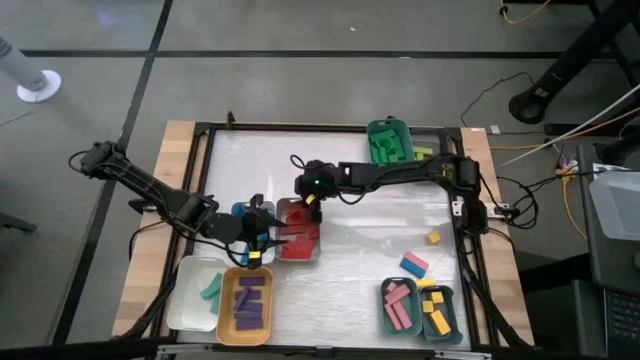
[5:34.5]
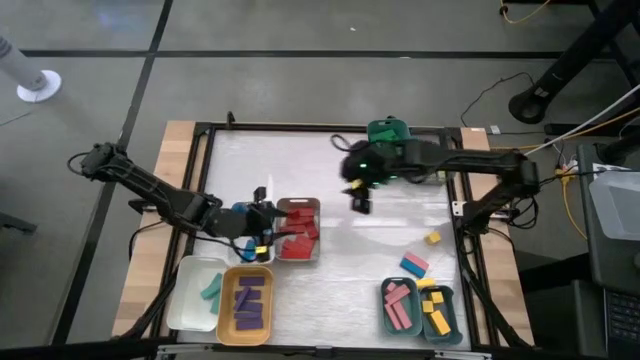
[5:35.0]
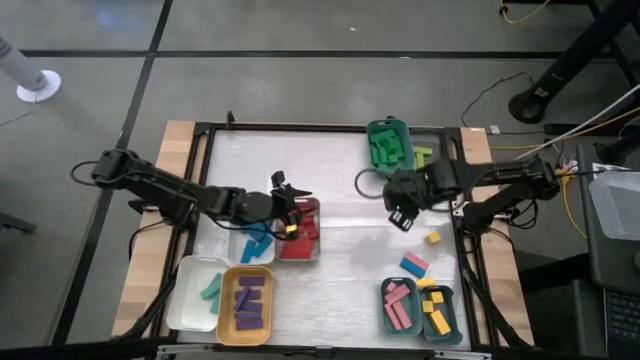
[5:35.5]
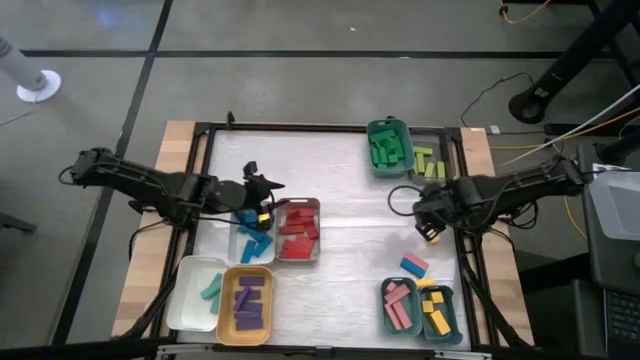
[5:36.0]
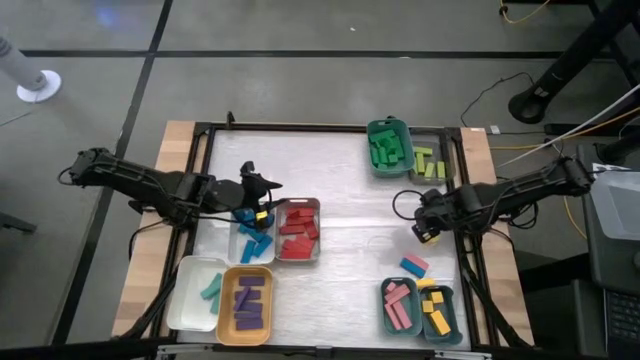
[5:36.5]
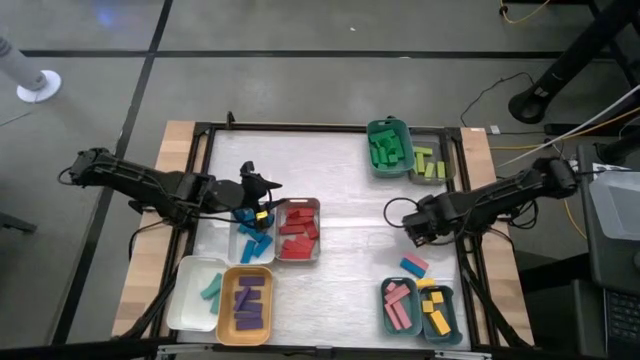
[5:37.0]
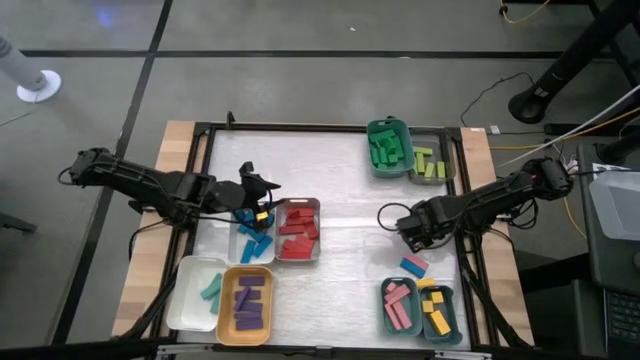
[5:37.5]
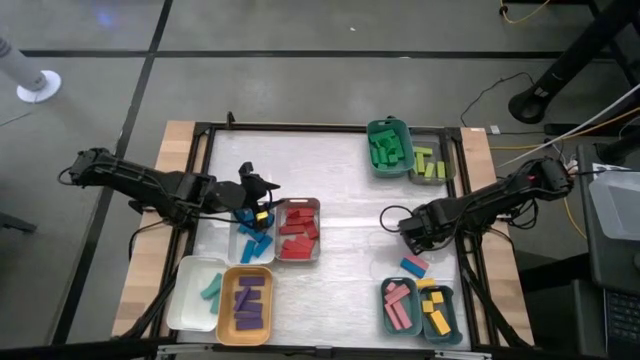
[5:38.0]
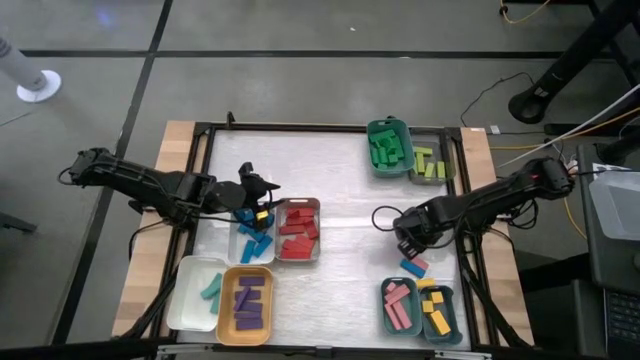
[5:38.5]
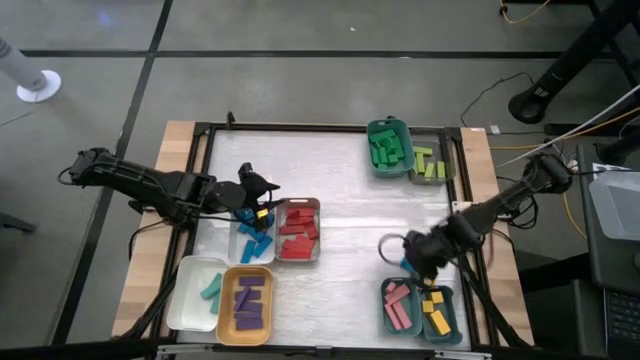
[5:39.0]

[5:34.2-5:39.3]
Task: Sort blocks
Put the yellow block into the dark blue bin

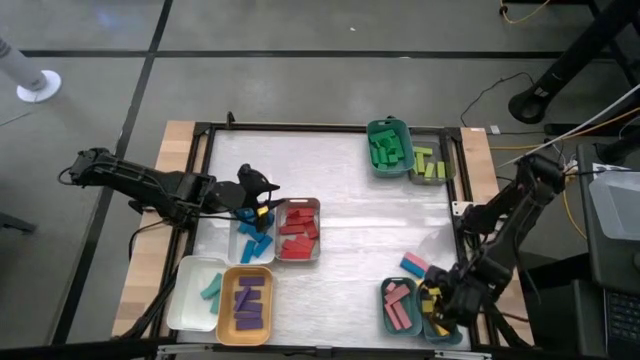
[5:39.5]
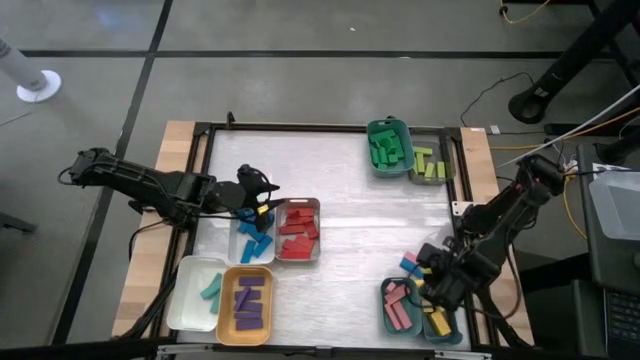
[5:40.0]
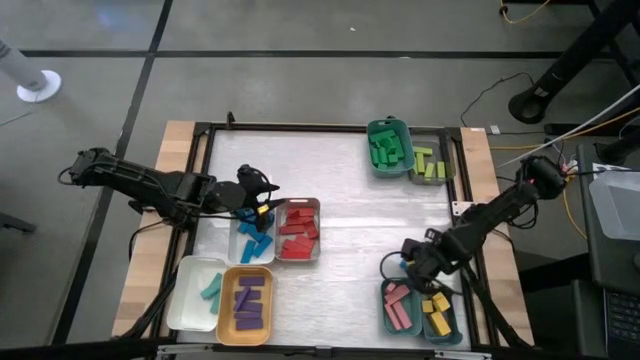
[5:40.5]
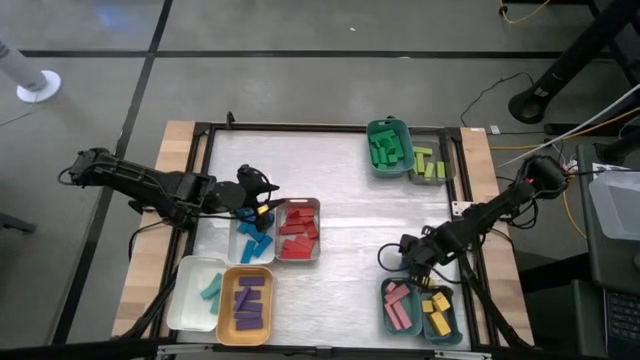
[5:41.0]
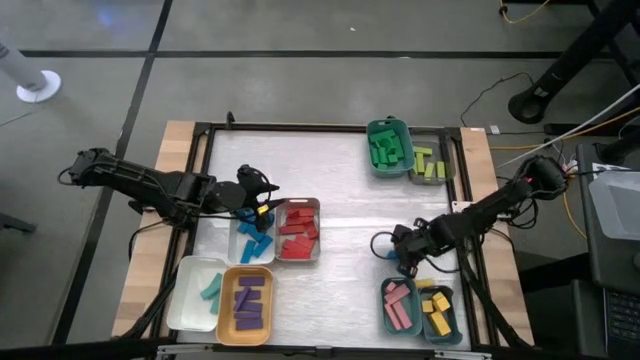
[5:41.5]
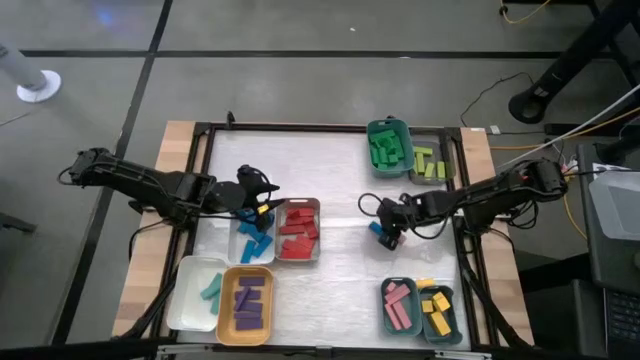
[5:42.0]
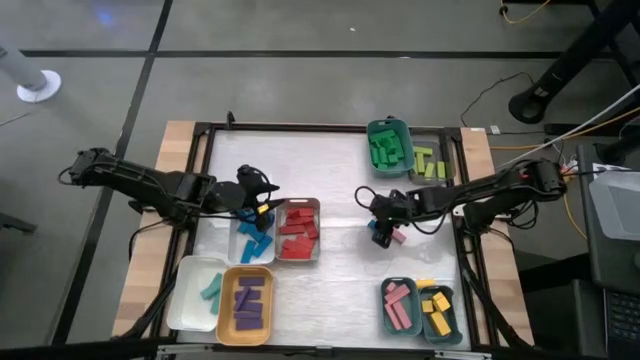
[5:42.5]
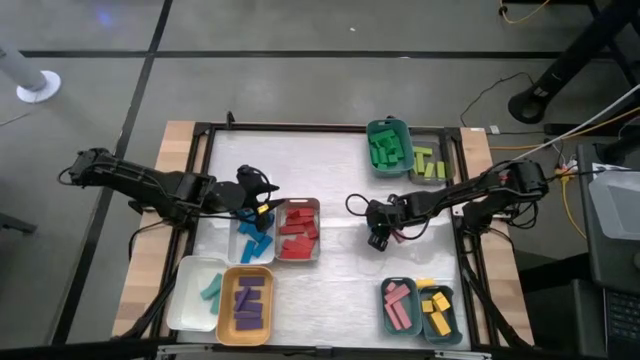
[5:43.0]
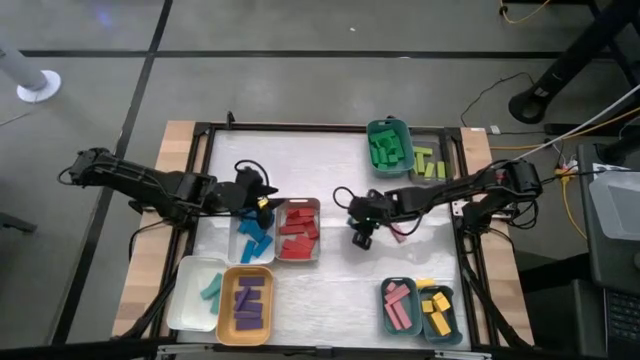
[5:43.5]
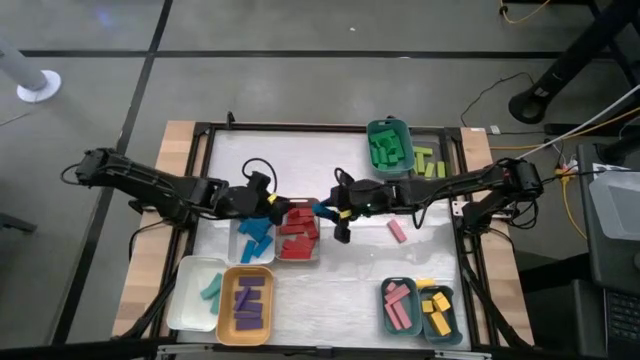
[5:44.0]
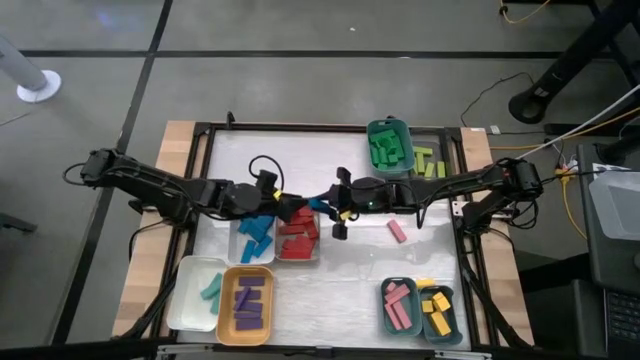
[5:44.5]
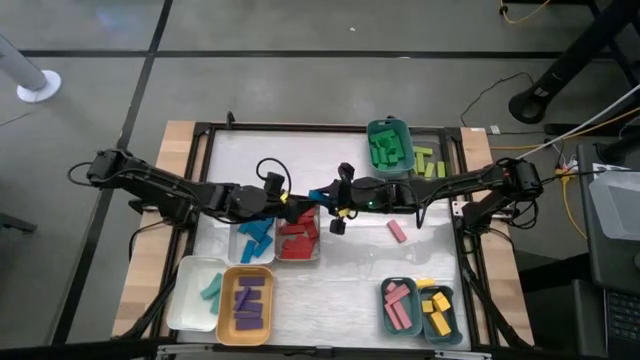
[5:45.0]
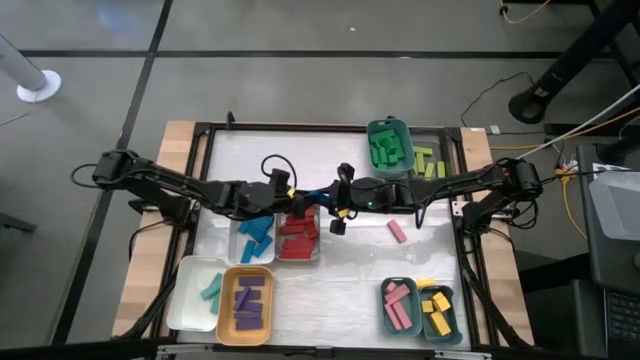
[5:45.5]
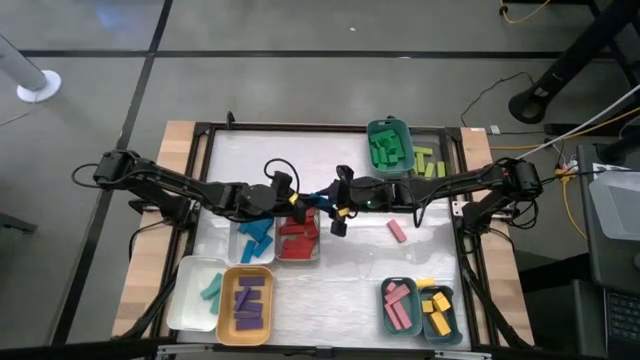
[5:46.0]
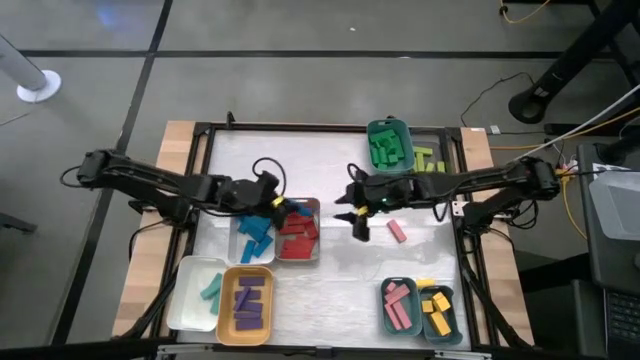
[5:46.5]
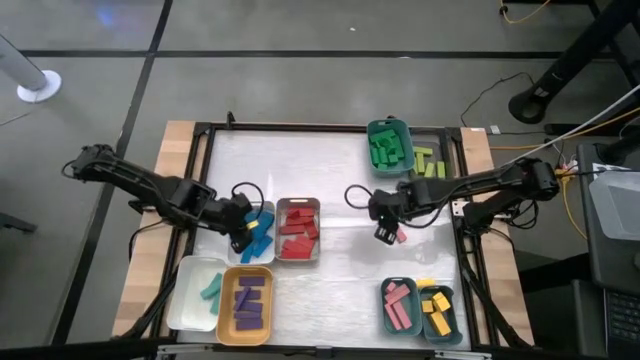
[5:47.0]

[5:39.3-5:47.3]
Put the blue block into the top white bin

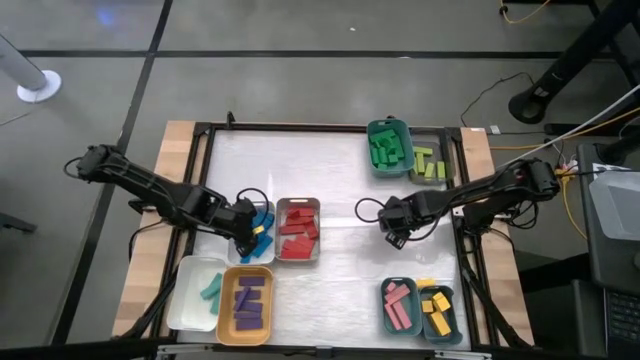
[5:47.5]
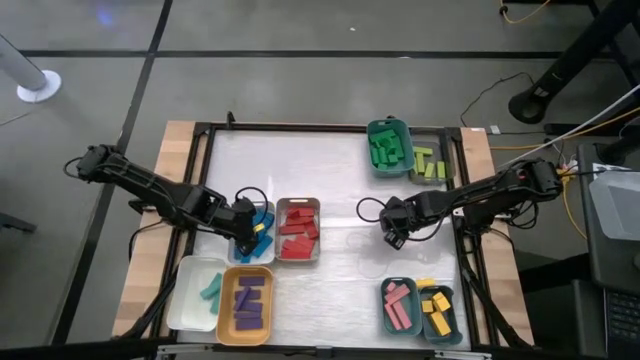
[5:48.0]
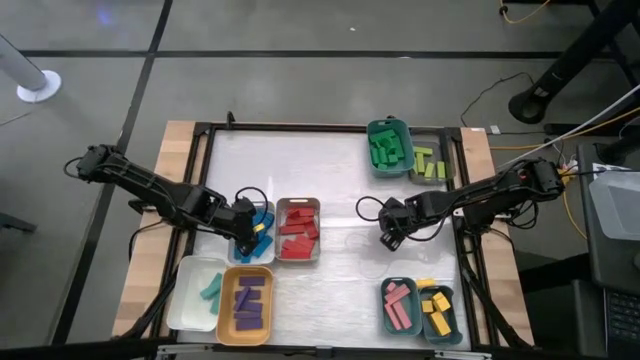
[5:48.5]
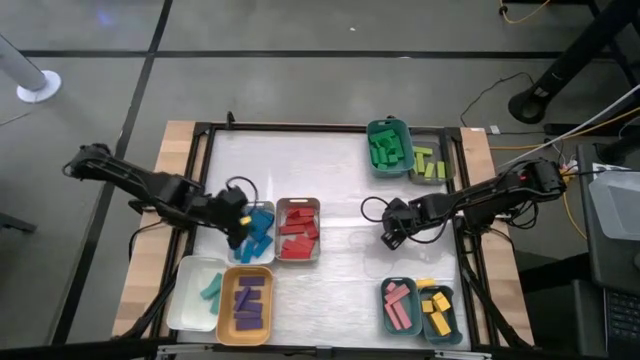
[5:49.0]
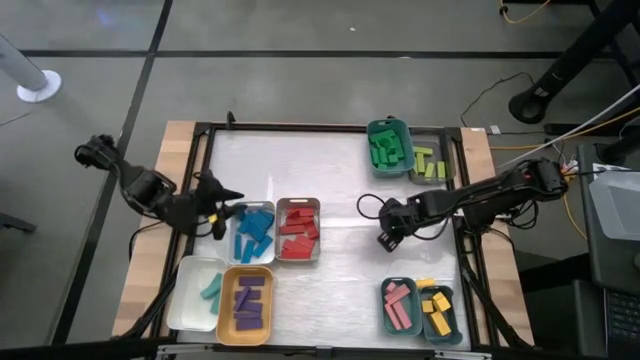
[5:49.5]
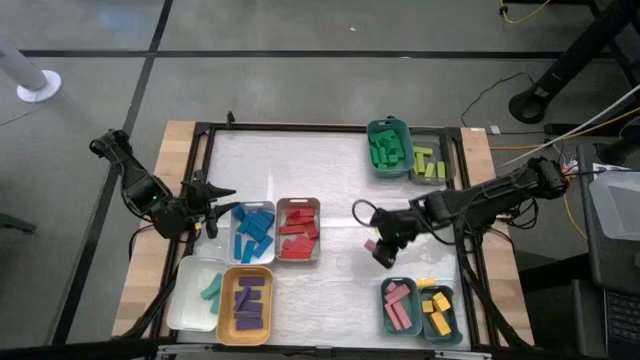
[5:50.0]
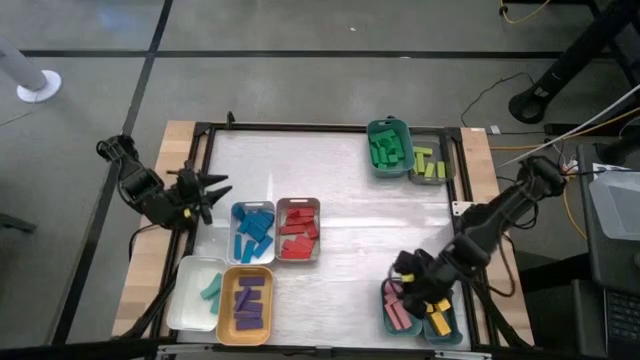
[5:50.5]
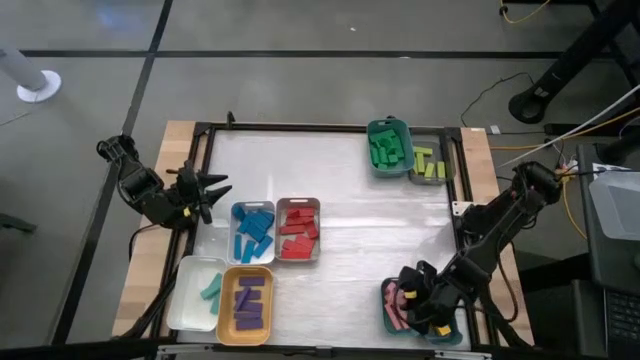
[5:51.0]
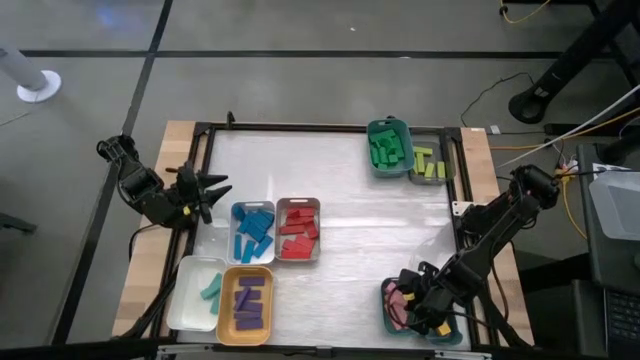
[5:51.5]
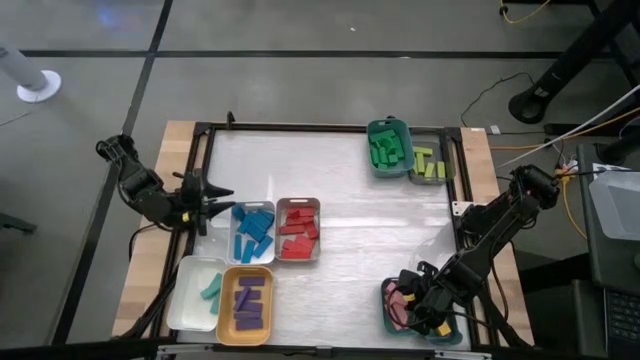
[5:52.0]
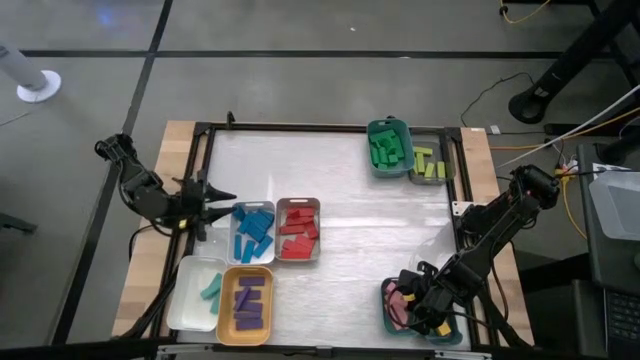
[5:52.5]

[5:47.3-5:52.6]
Put the pink block into the bottom green bin

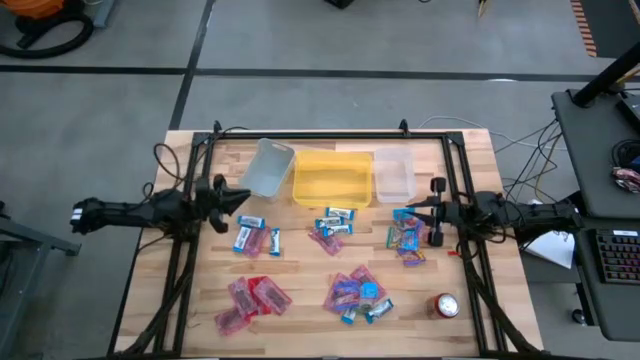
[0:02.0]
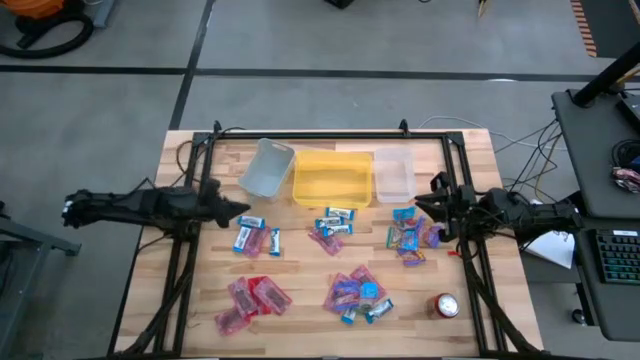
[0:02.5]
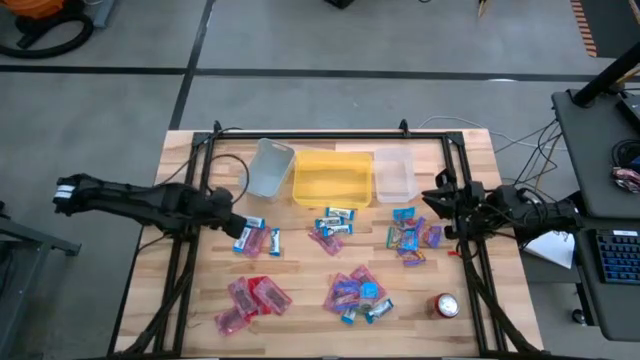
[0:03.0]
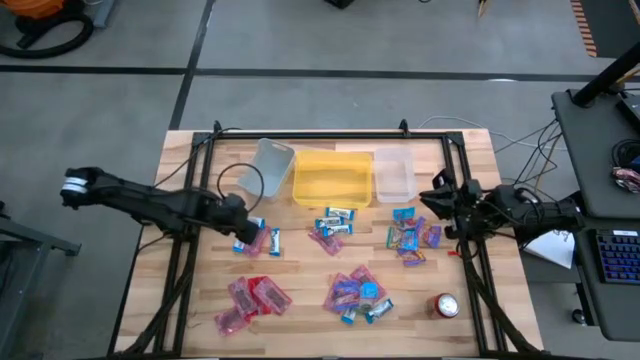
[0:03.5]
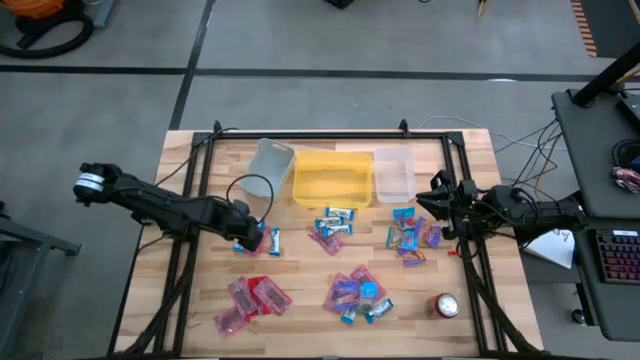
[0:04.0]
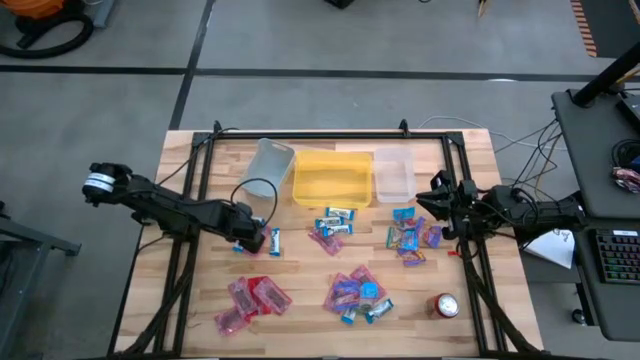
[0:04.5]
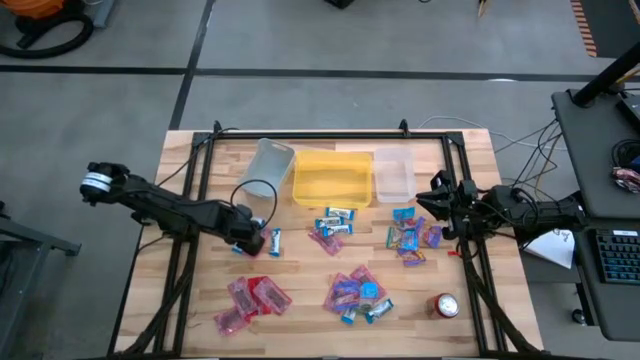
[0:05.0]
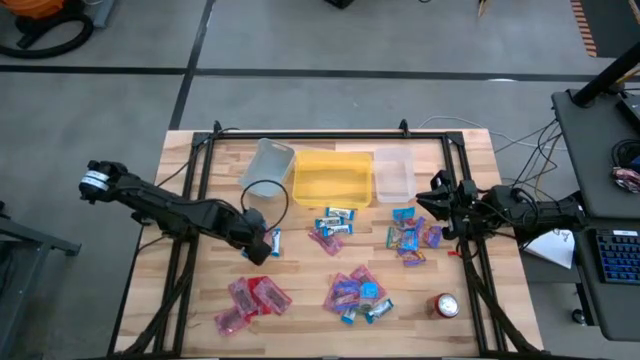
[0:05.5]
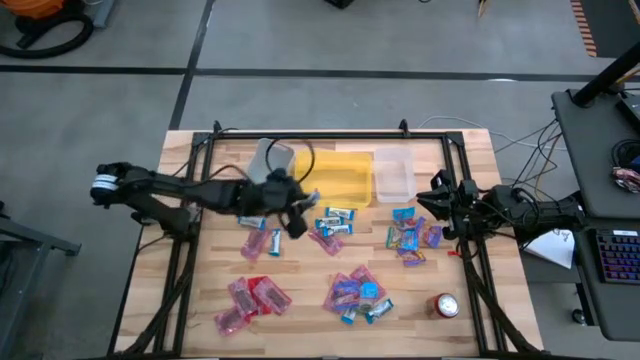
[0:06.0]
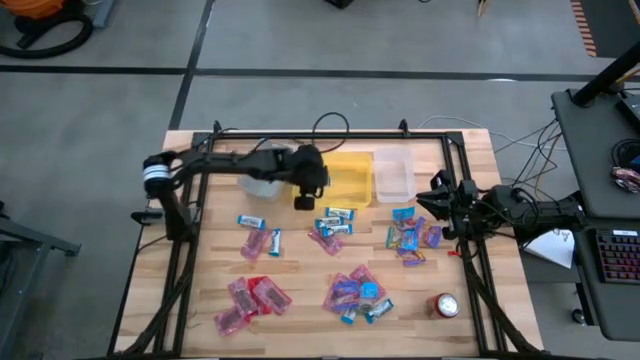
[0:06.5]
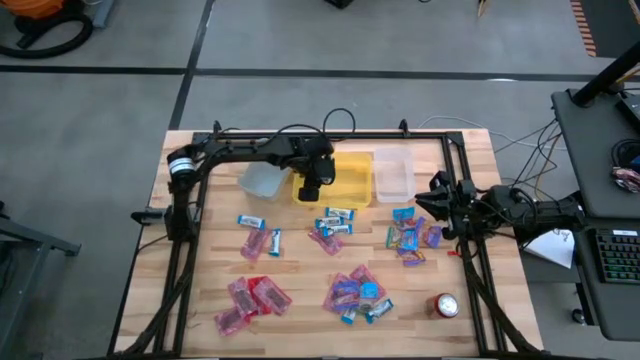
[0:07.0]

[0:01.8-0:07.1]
Task: Sort candy
Put the white chocolate into the yellow bin
